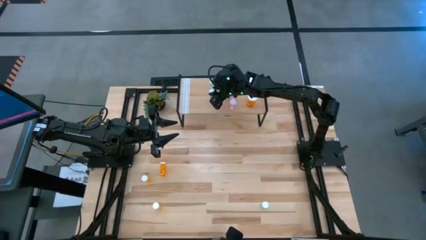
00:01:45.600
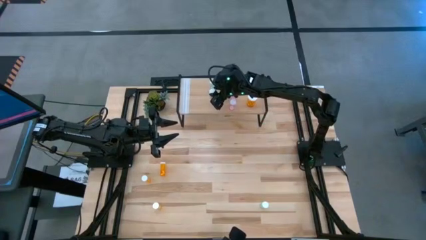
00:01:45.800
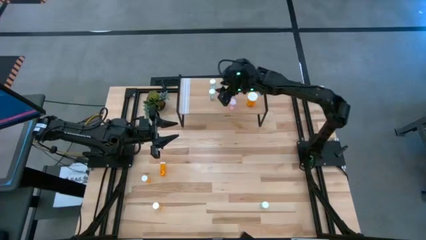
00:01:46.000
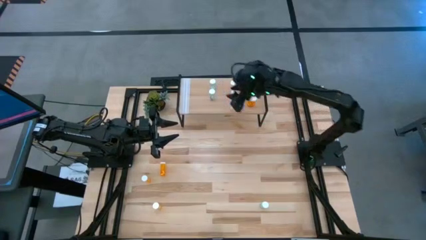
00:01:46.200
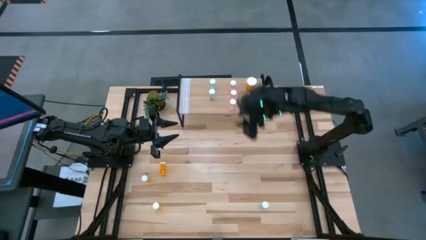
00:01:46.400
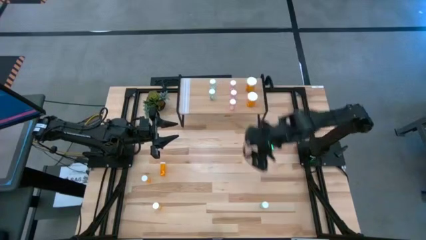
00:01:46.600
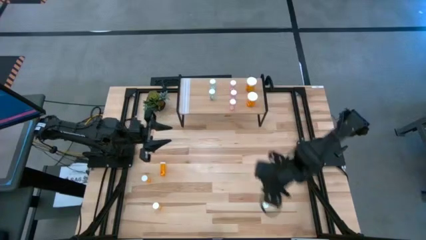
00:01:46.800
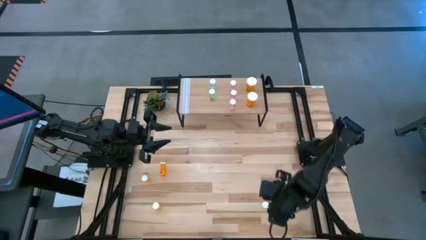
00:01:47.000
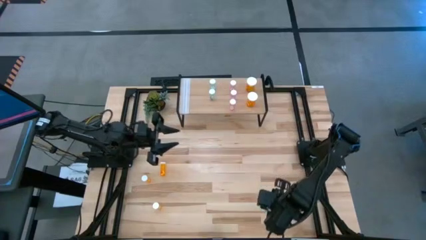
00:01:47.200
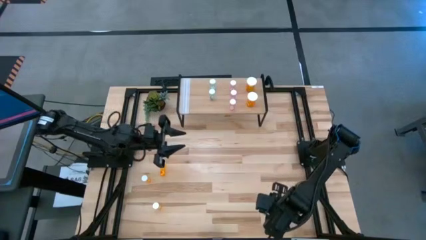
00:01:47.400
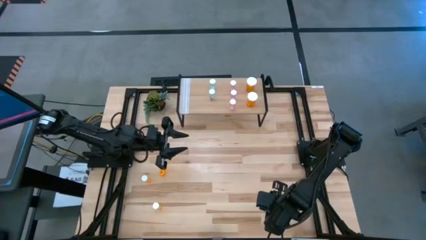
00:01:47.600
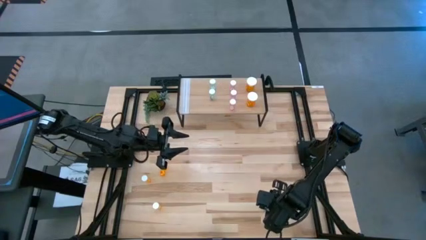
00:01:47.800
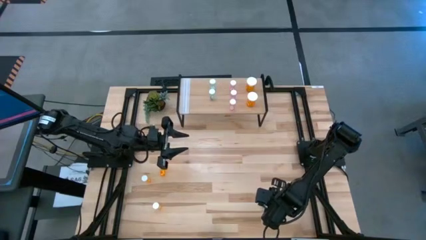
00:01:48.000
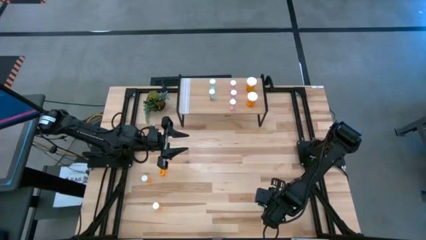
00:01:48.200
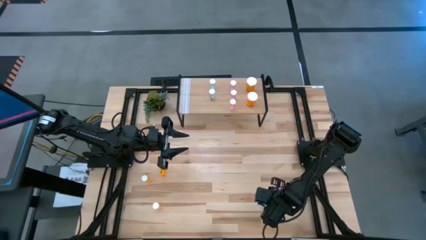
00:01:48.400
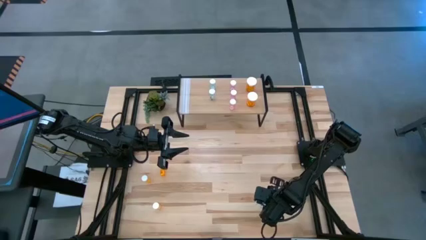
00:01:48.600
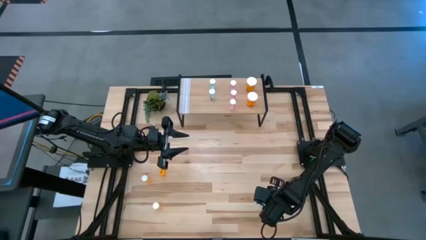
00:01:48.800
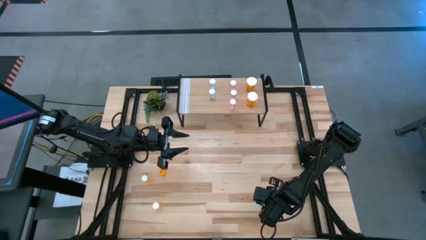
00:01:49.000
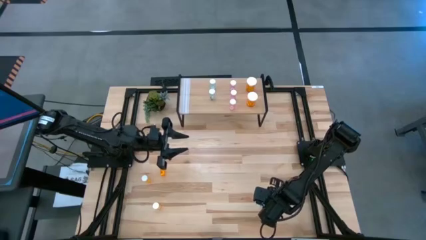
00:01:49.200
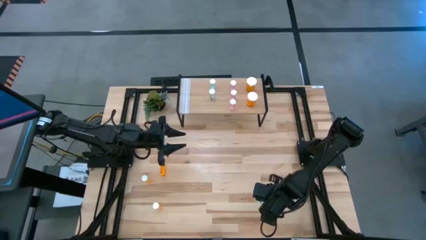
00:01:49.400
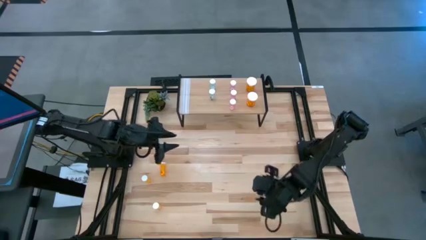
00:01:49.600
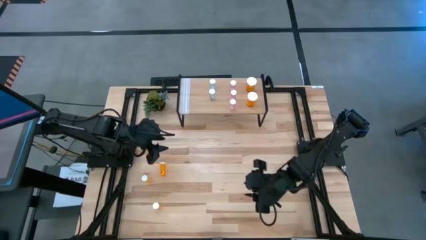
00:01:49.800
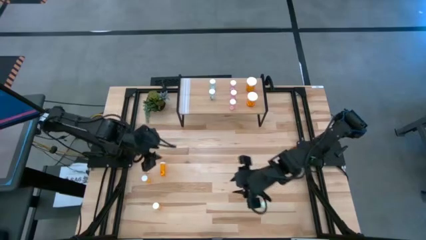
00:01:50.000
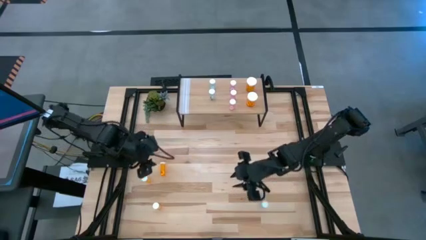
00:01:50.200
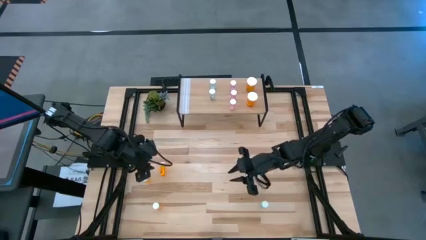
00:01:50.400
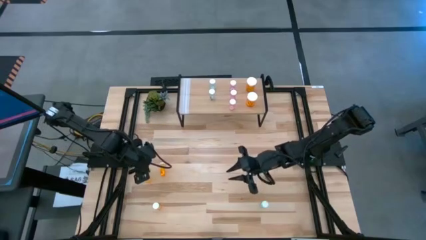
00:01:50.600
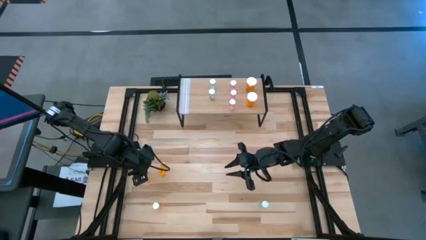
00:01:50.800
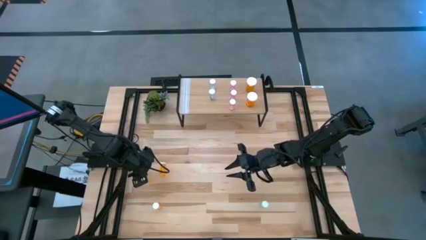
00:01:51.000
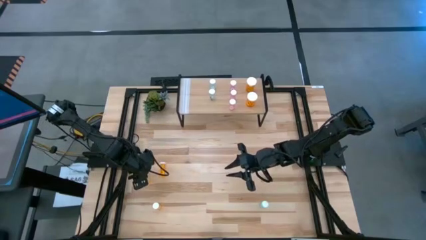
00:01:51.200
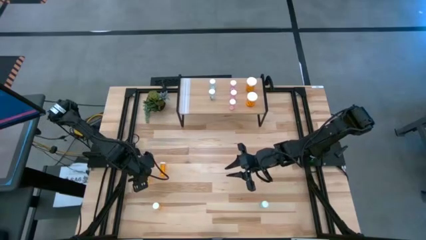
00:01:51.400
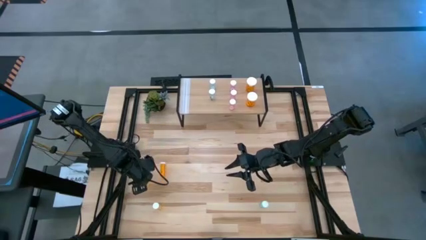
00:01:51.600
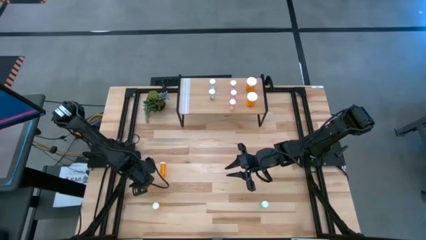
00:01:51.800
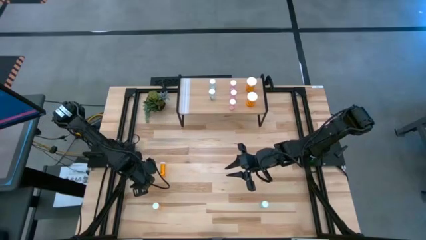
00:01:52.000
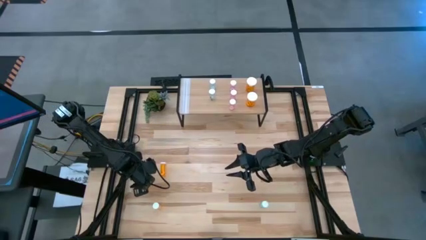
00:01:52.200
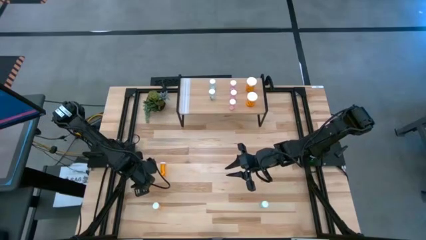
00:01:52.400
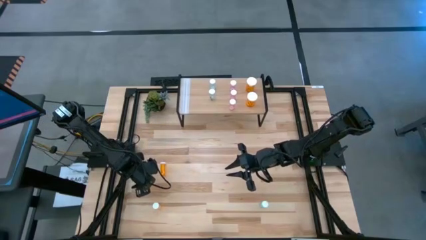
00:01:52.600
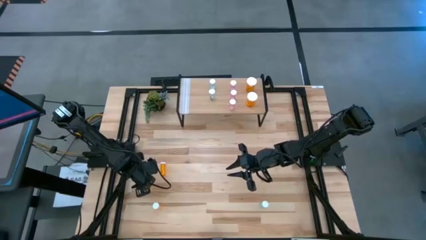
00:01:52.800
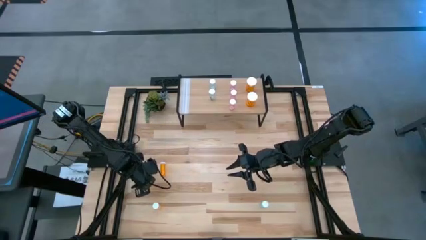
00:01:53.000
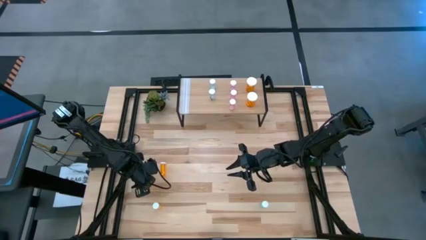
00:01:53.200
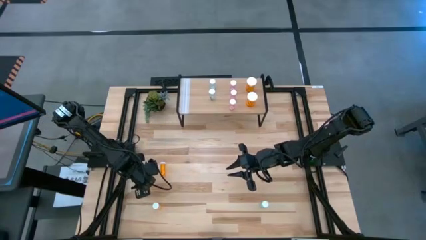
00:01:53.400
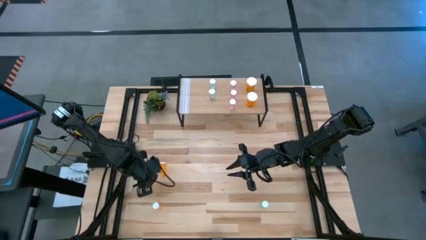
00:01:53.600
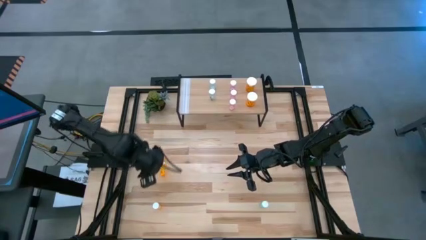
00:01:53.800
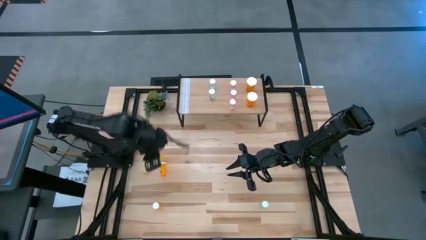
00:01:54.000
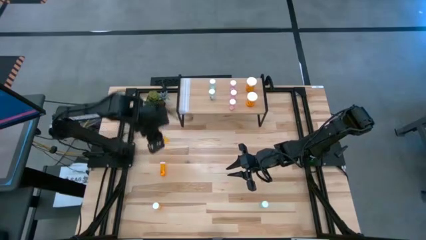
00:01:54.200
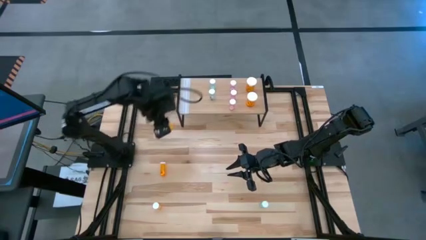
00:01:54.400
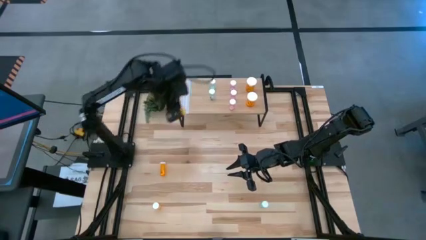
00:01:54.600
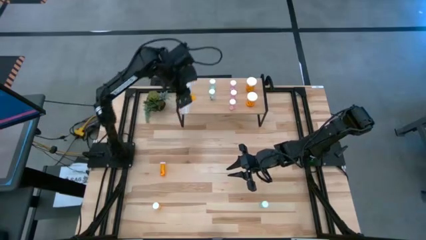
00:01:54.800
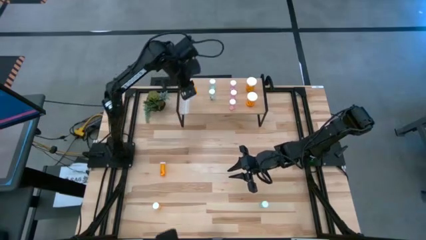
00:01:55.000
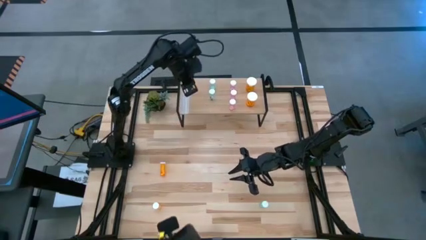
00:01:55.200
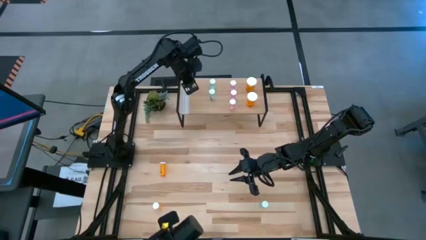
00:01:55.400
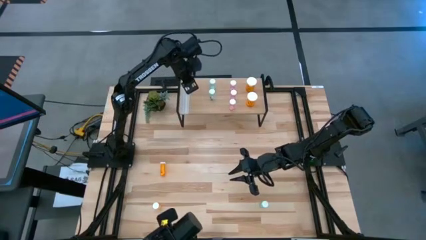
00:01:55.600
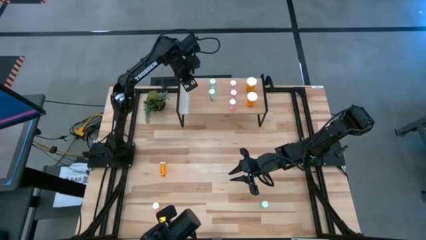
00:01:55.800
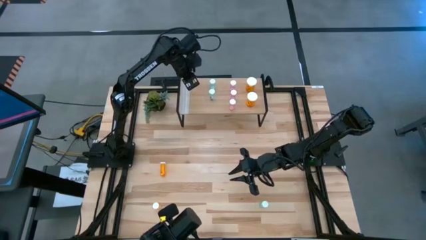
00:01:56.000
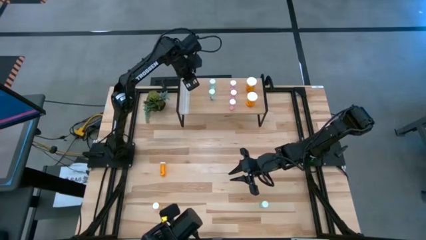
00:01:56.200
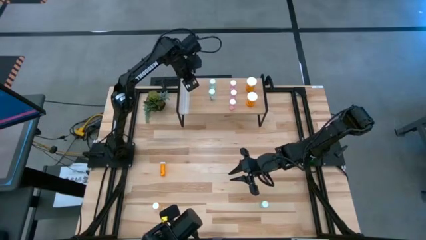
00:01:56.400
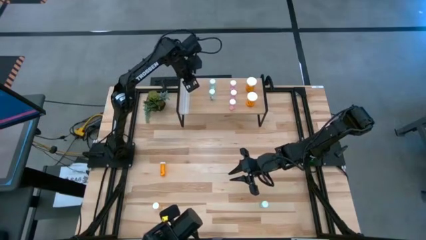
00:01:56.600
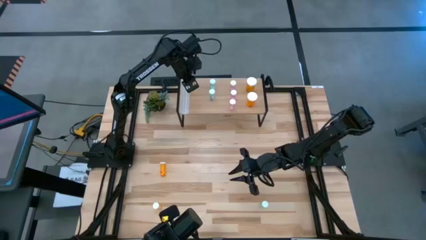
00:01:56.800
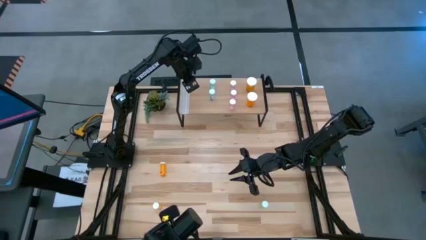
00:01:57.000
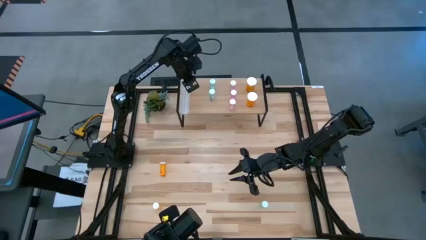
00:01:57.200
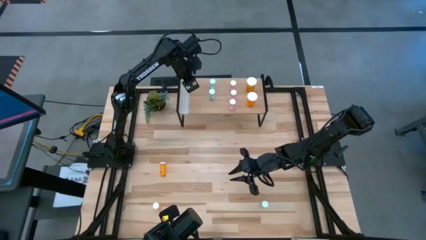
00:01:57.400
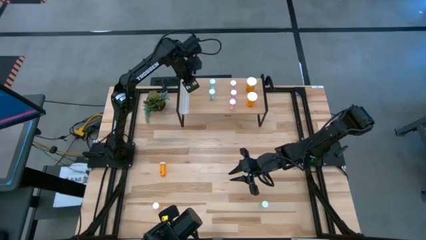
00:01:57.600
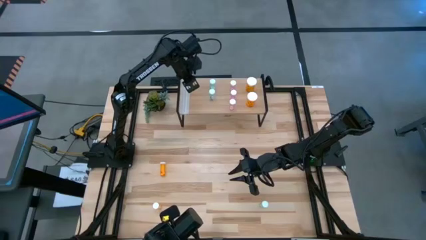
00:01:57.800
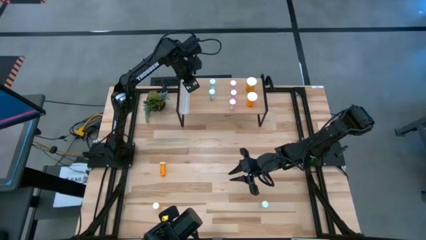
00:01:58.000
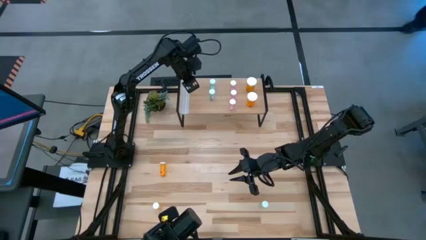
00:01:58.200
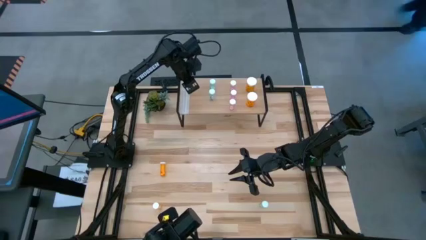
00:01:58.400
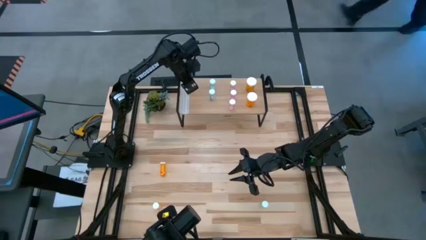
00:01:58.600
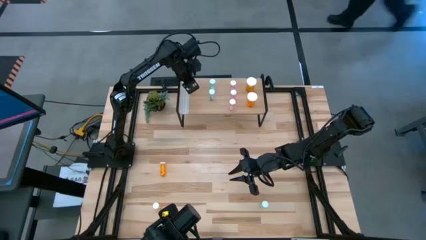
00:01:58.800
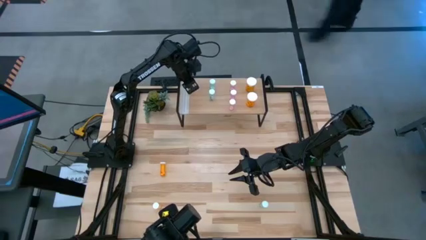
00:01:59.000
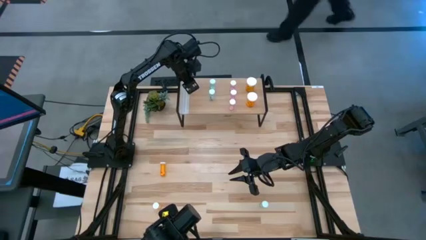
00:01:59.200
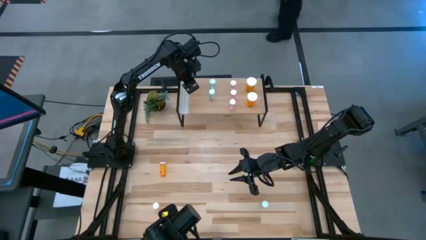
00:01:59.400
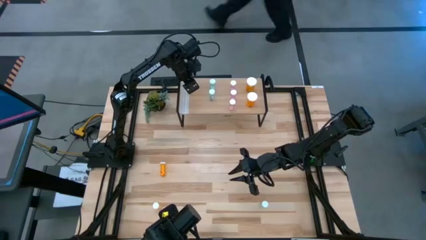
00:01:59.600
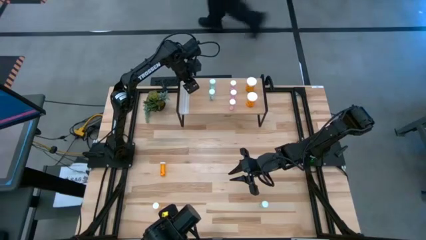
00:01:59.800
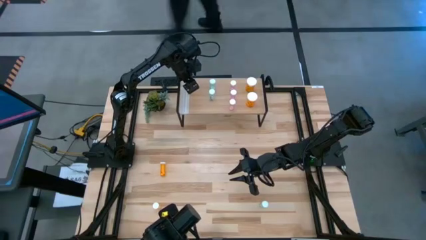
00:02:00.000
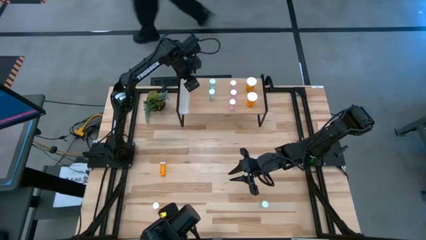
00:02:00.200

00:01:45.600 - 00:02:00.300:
Task: Pick and place medicine bottles onto shelf by color
Put the middle small orange pill bottle on the shelf
